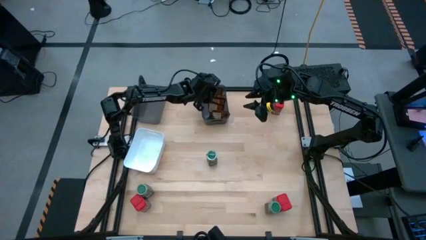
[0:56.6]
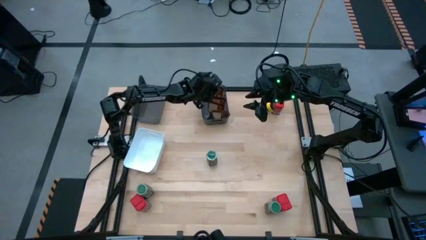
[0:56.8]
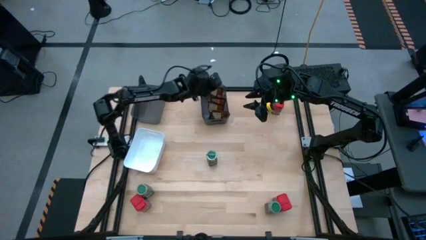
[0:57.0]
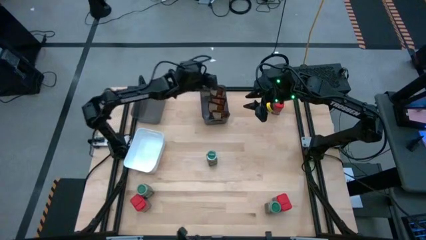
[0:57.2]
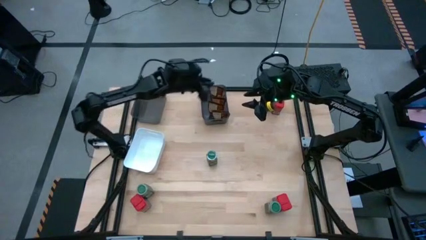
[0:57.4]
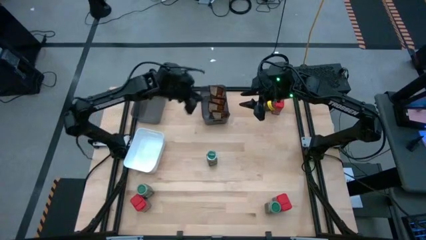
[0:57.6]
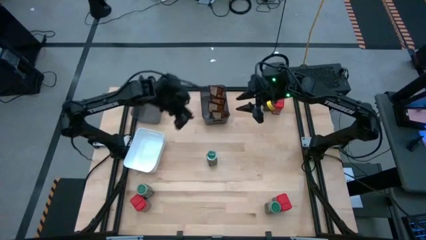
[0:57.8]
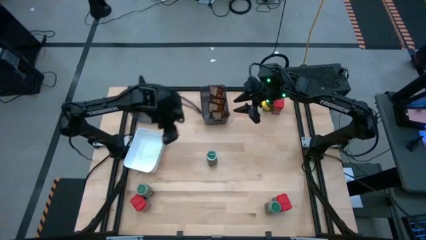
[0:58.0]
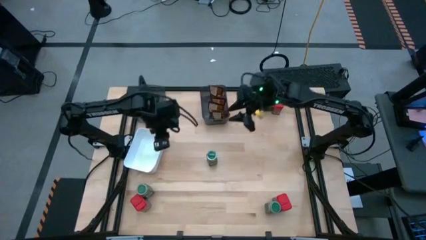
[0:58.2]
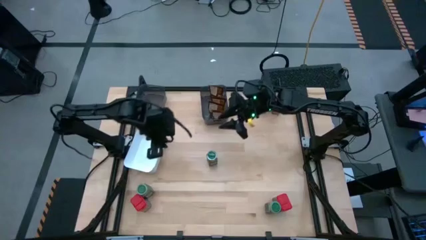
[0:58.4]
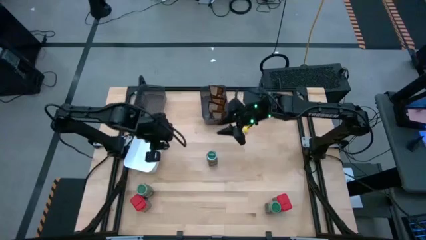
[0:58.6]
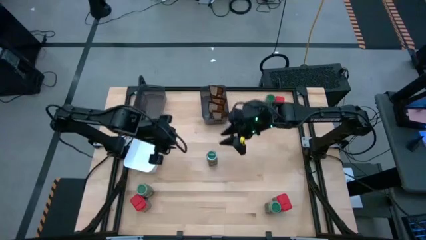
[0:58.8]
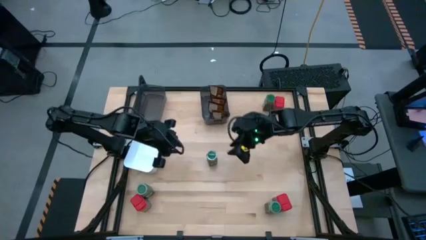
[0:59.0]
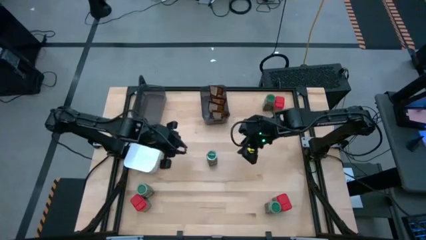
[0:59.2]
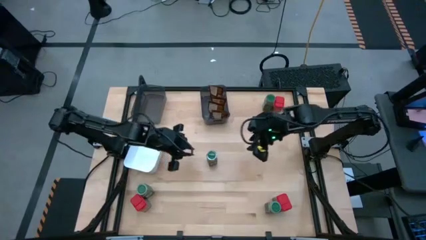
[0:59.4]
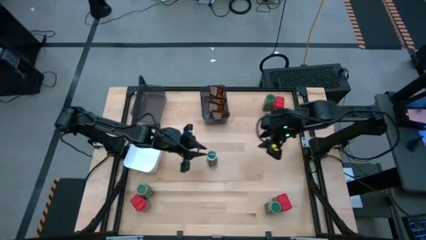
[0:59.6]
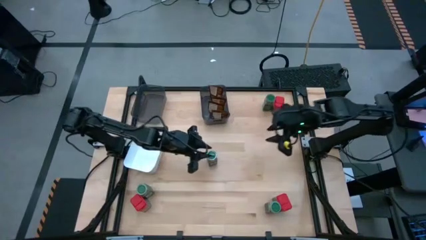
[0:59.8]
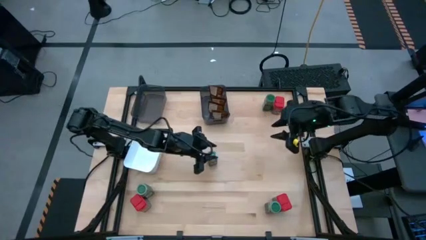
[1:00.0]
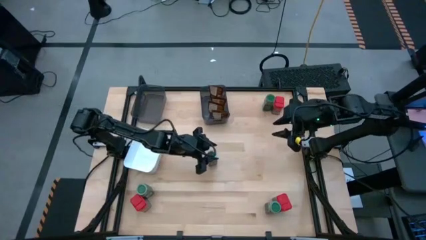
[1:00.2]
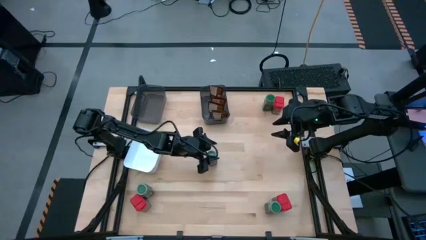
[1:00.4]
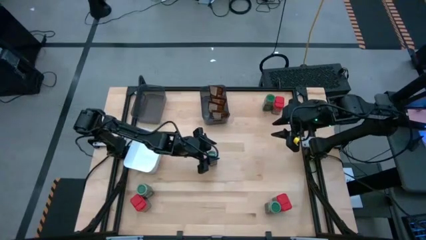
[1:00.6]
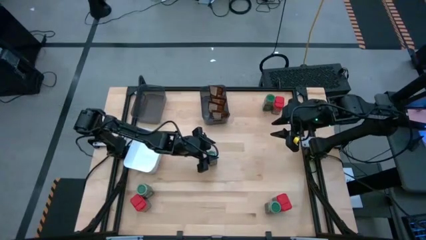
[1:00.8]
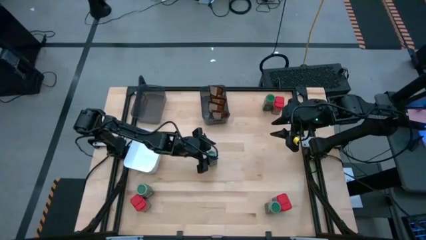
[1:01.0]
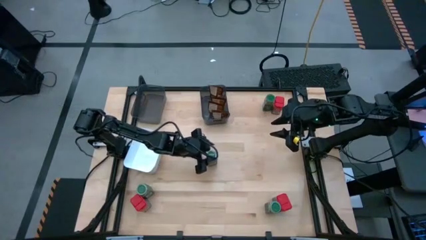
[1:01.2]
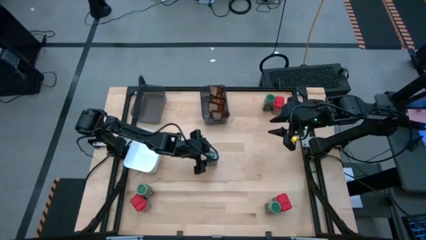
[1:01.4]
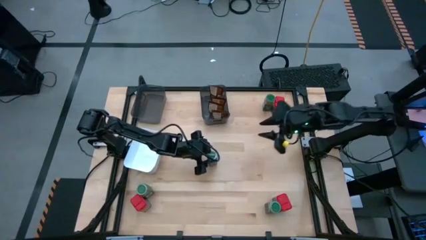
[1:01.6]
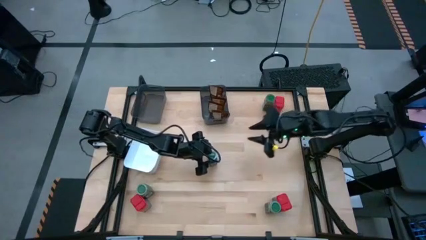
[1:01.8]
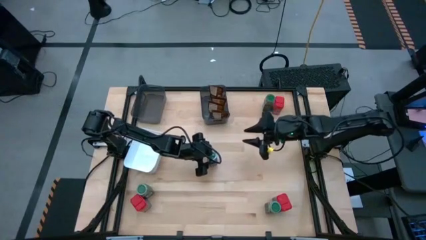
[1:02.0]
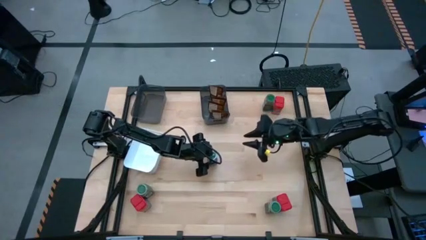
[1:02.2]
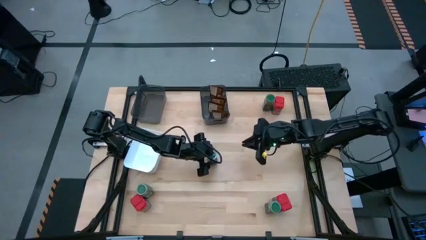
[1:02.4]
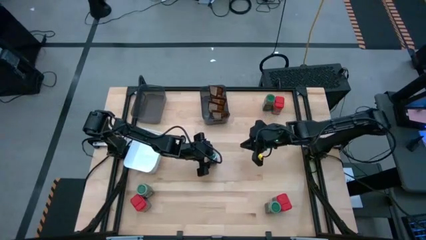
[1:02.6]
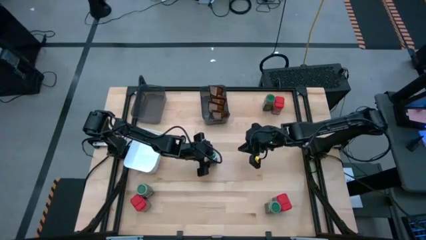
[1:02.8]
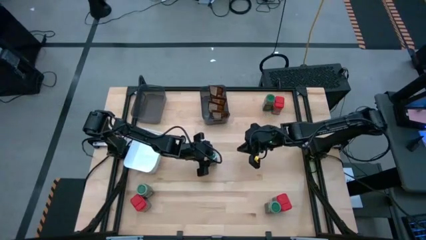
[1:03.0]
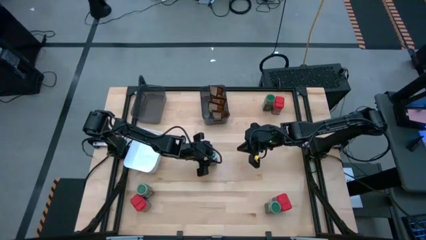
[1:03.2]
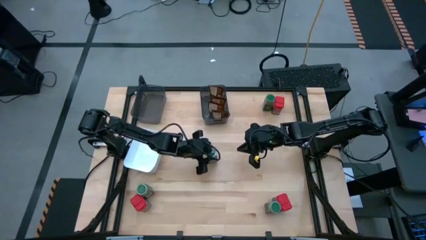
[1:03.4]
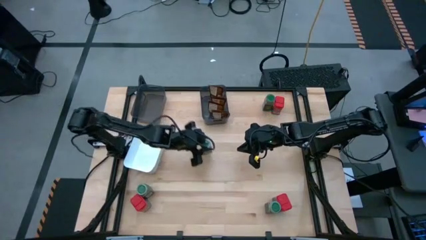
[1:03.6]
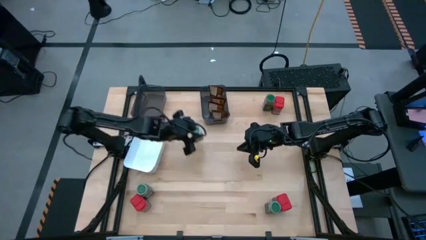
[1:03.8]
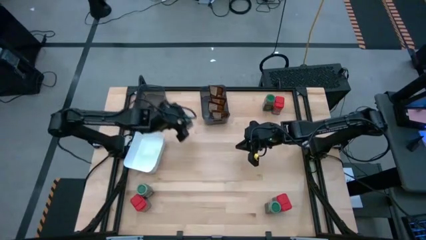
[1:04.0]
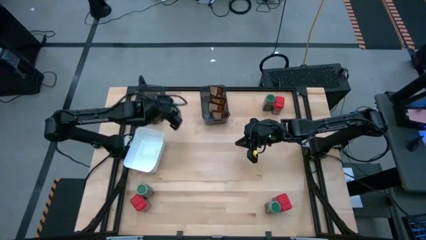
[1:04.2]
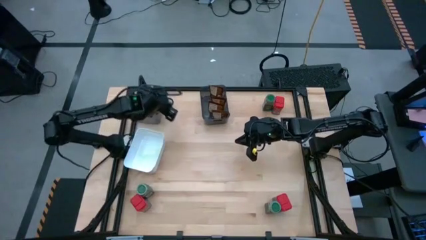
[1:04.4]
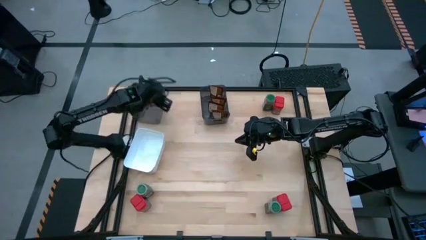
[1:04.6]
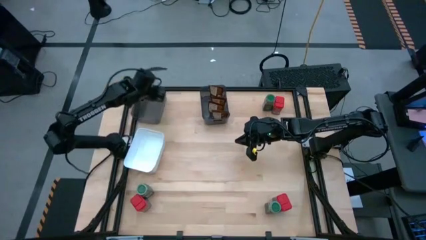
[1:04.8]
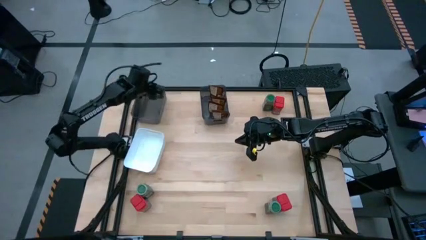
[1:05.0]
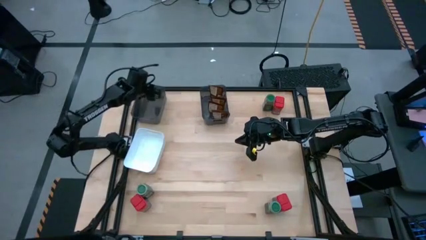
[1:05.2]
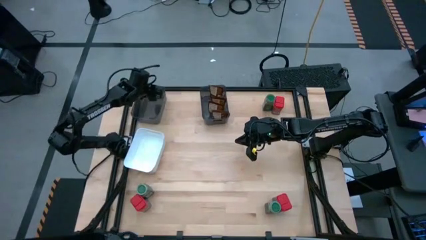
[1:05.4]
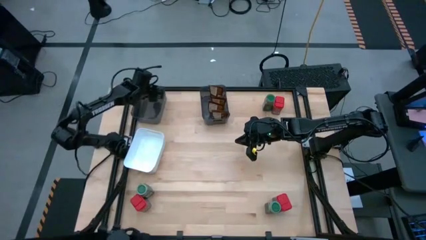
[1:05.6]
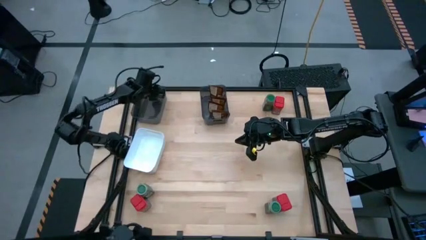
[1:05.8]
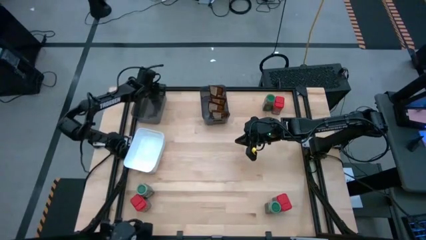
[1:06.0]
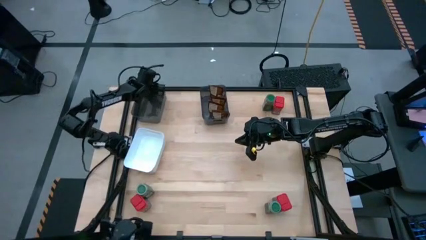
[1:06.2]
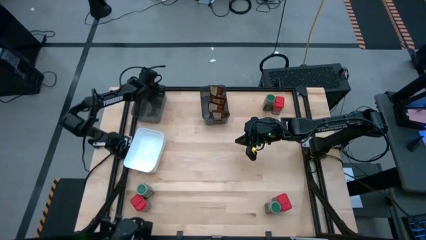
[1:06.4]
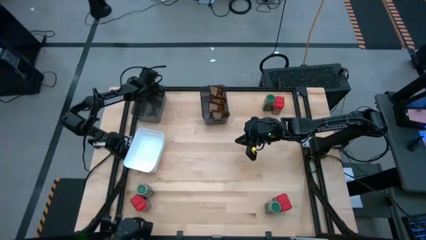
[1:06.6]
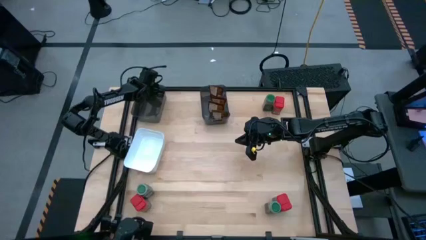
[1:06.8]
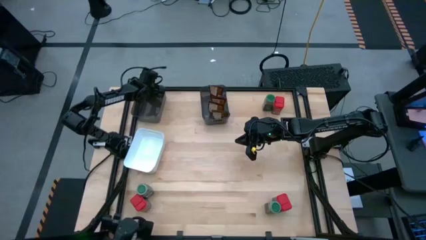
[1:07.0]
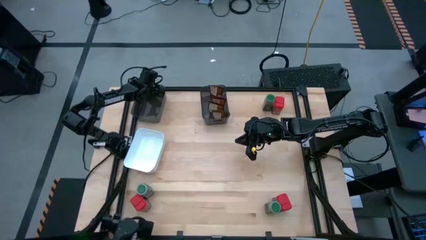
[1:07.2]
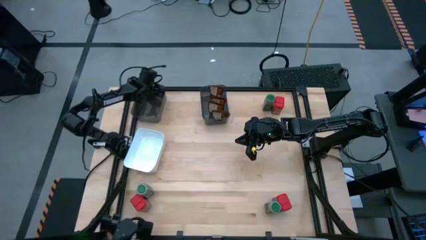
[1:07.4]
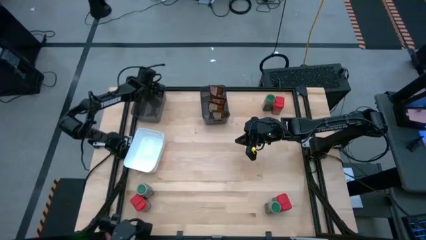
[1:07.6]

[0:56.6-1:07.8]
Task: Sort spices by type
Put the center green seasoning bottle into the left black bin

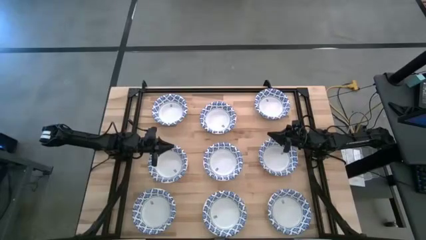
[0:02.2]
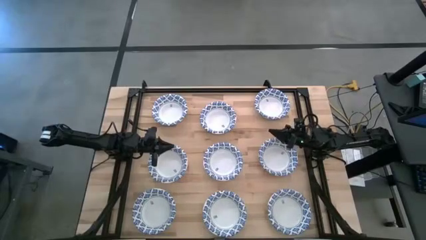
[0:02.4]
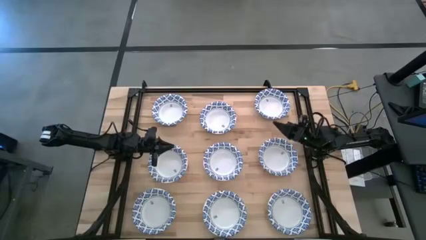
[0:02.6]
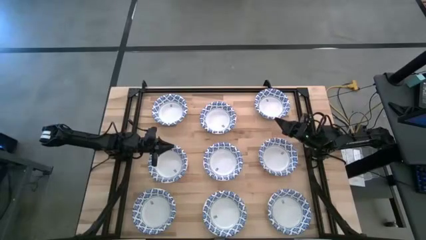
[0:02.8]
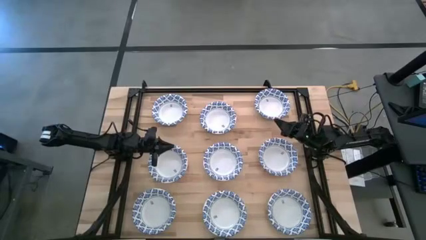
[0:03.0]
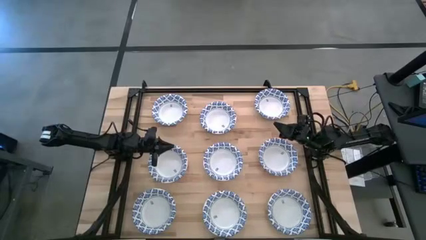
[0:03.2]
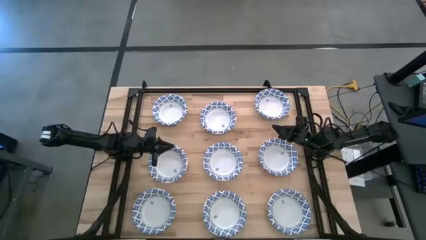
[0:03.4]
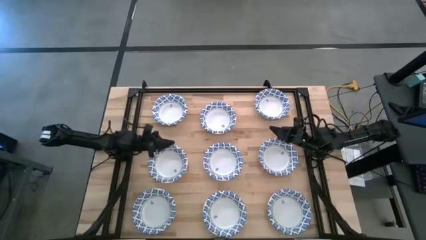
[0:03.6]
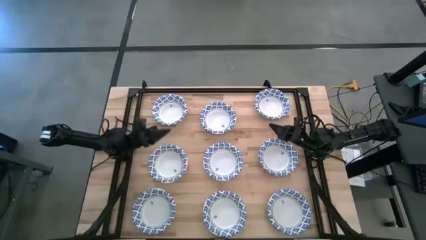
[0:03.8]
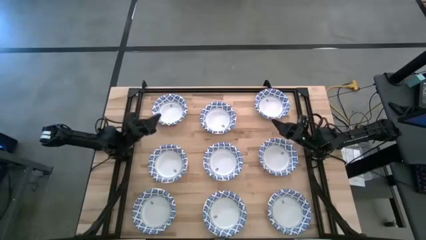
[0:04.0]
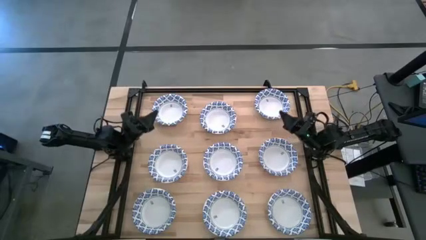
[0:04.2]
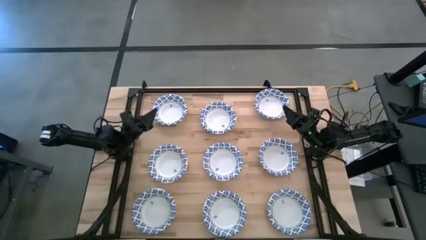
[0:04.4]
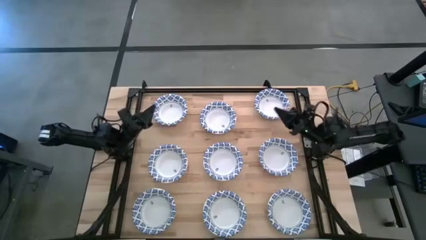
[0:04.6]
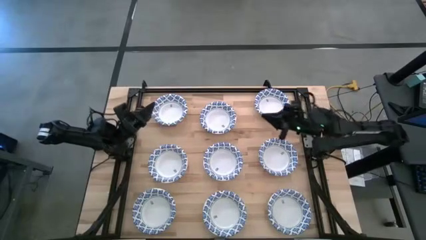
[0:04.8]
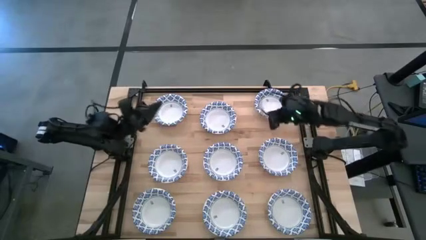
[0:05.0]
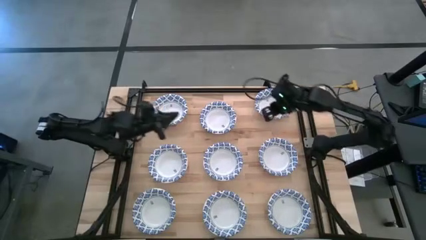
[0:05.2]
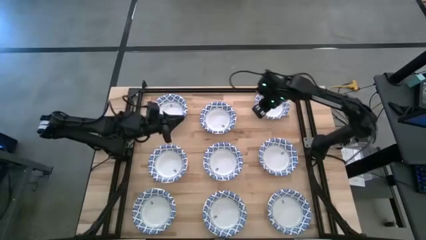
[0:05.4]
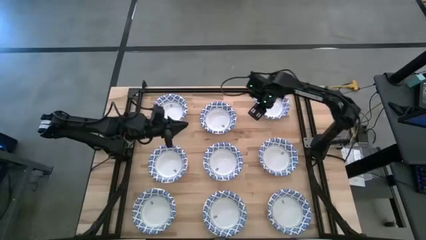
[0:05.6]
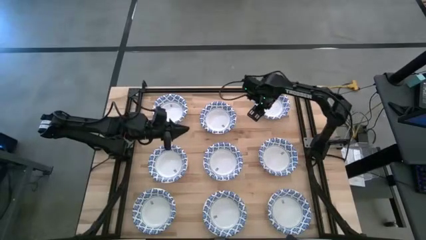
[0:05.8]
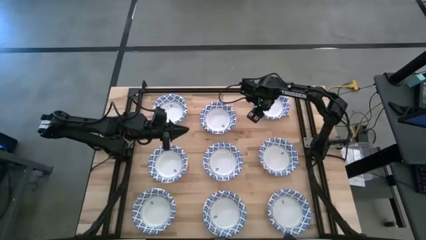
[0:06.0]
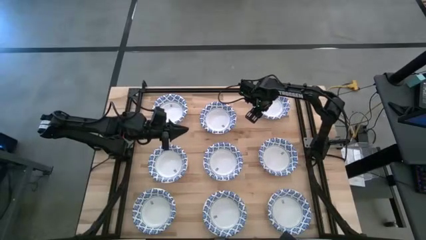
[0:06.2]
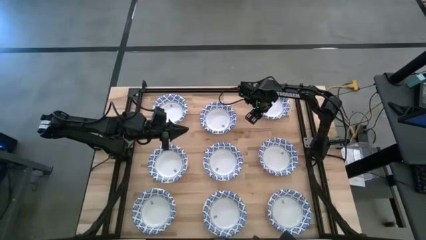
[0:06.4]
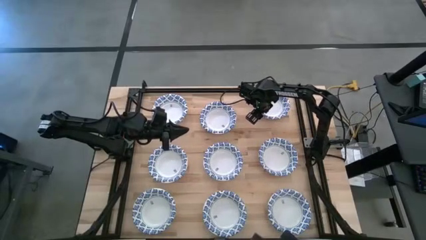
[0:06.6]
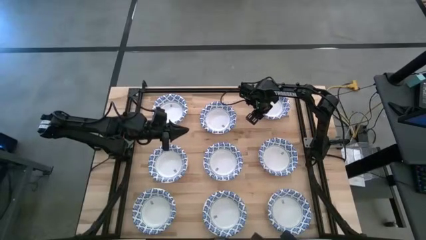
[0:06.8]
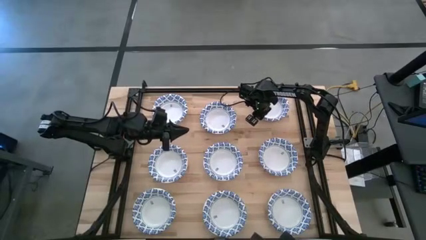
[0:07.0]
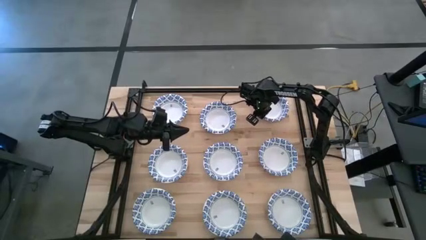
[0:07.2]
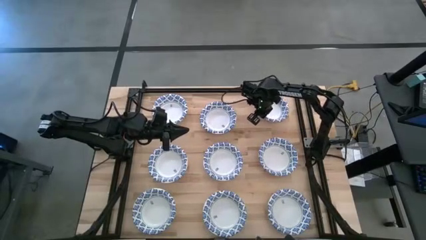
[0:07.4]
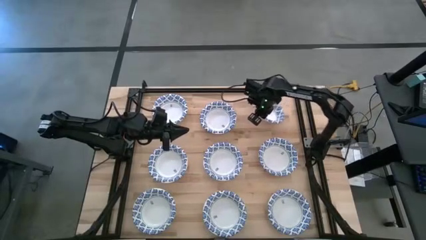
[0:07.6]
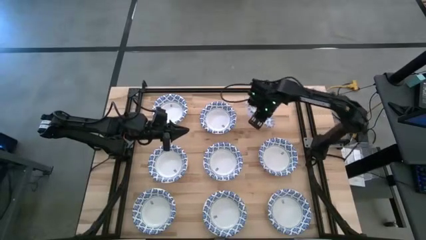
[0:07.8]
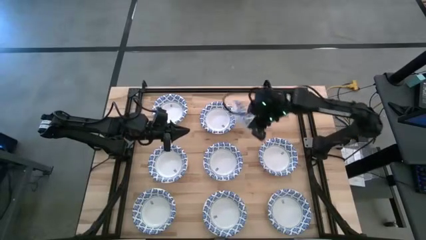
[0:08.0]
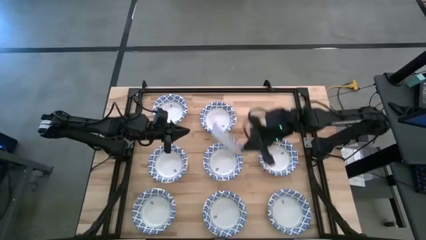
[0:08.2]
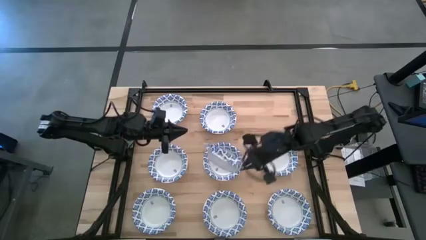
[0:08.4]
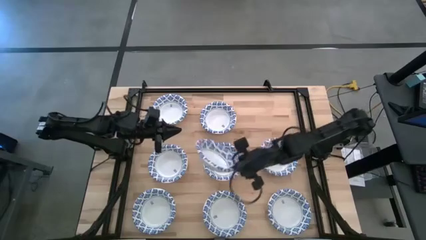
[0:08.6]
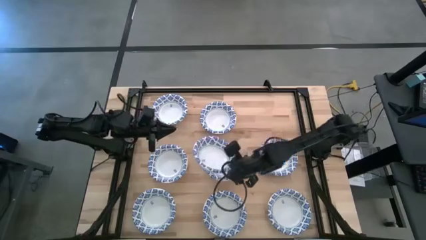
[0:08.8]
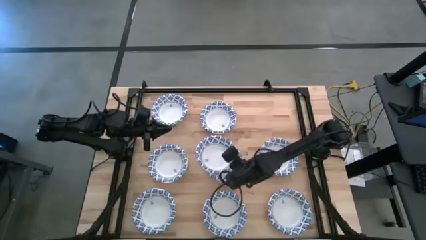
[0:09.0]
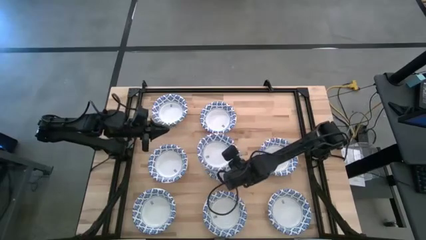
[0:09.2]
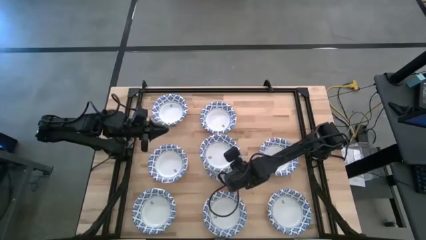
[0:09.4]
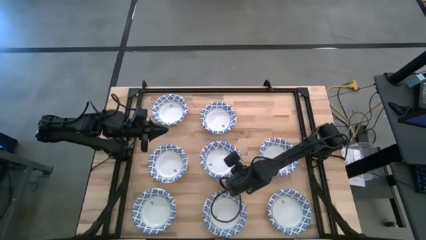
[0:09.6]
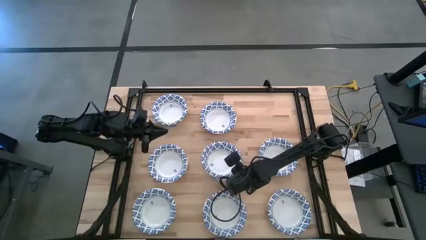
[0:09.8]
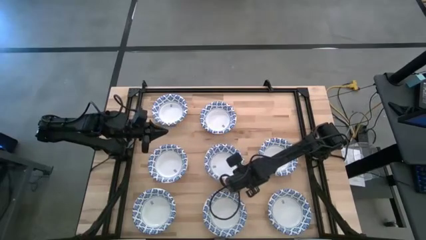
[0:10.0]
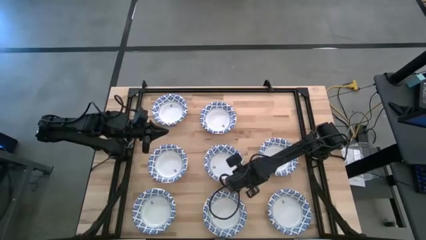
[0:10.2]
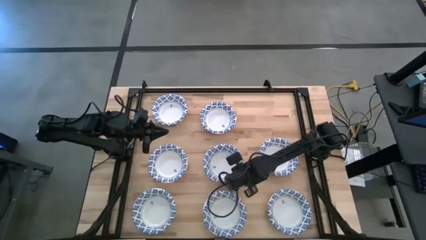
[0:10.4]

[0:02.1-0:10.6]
Task: Nest bowls inside each other
Stack the white patterned bowl on top of the other white patterned bowl
